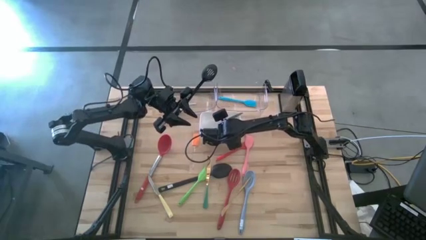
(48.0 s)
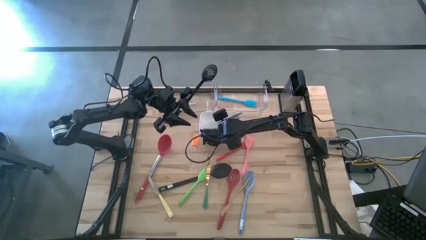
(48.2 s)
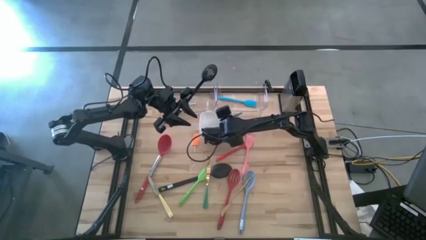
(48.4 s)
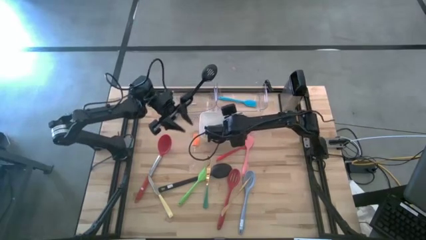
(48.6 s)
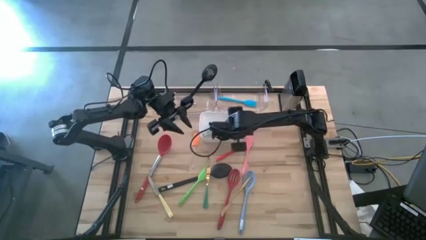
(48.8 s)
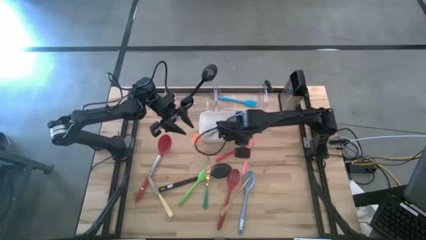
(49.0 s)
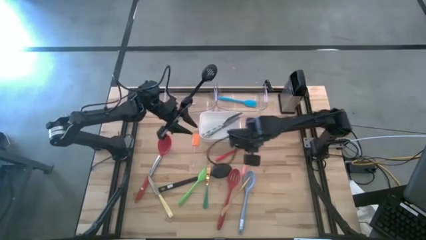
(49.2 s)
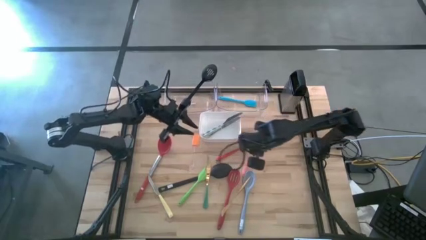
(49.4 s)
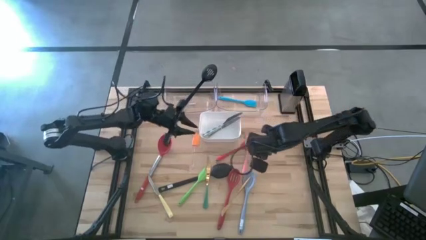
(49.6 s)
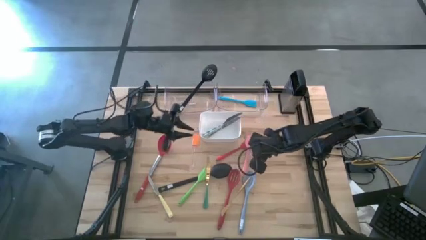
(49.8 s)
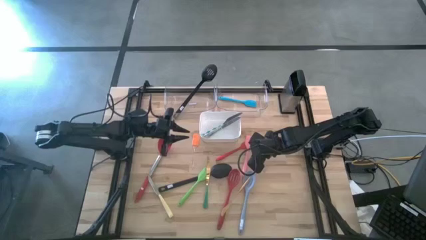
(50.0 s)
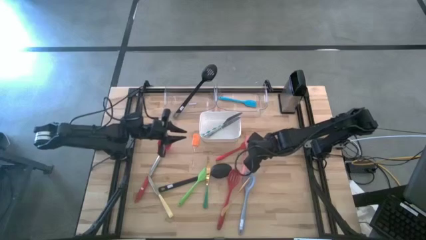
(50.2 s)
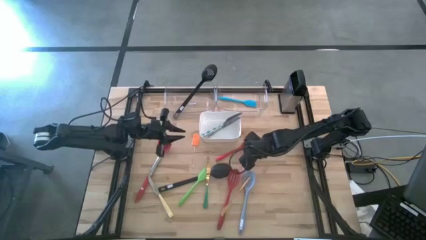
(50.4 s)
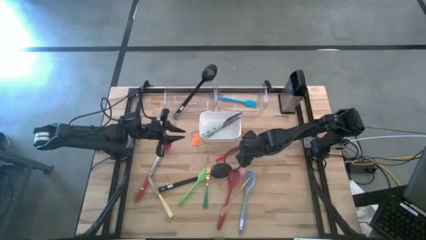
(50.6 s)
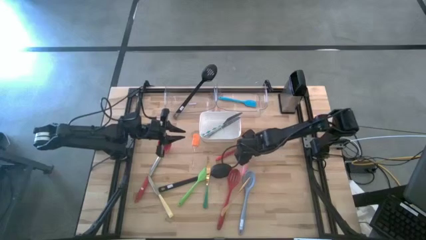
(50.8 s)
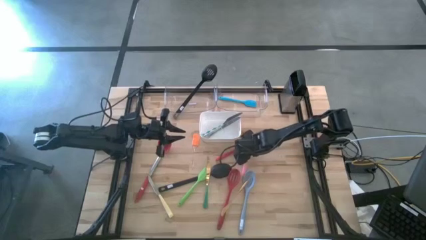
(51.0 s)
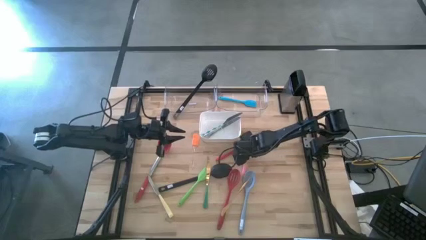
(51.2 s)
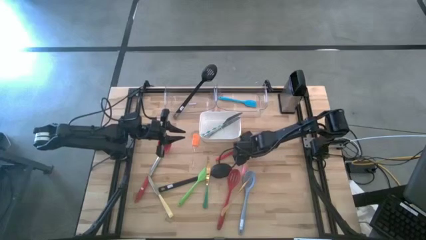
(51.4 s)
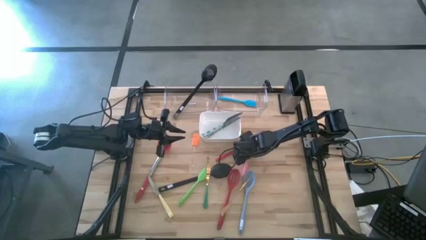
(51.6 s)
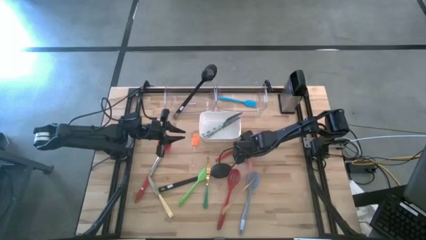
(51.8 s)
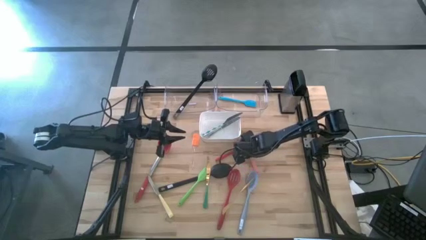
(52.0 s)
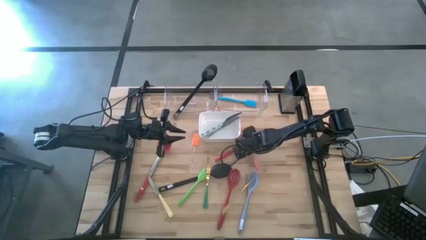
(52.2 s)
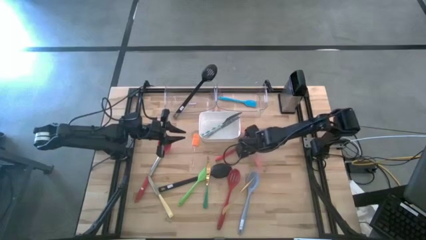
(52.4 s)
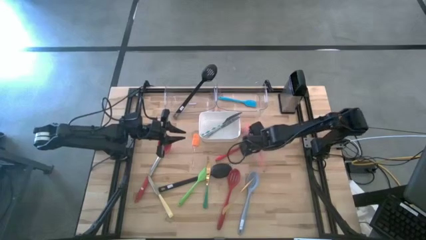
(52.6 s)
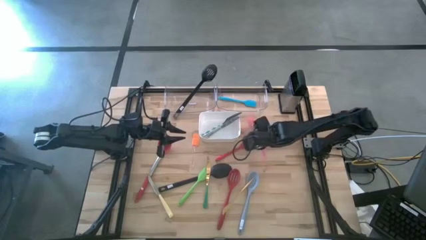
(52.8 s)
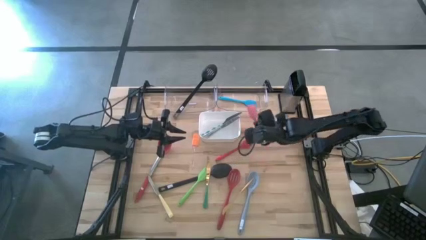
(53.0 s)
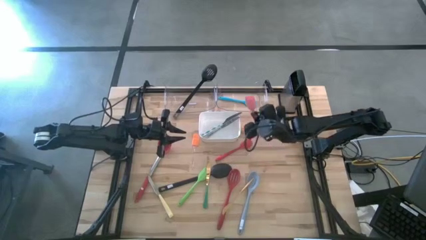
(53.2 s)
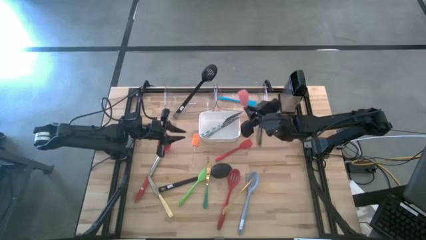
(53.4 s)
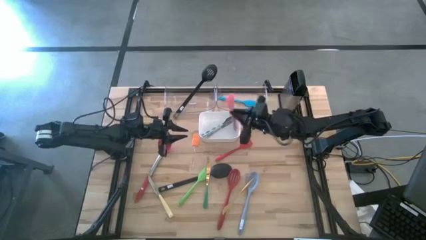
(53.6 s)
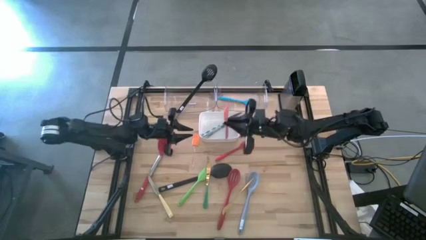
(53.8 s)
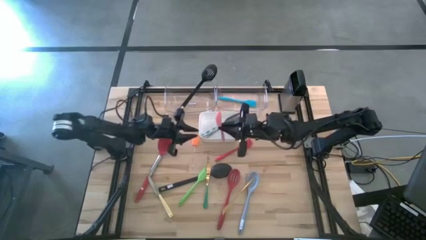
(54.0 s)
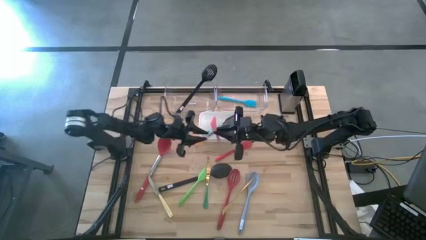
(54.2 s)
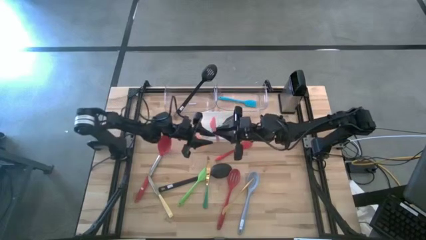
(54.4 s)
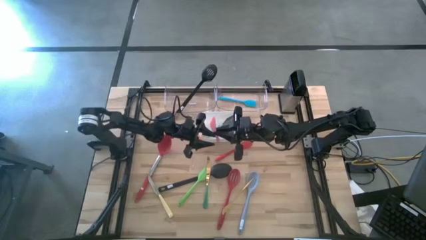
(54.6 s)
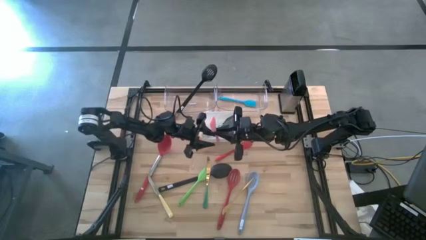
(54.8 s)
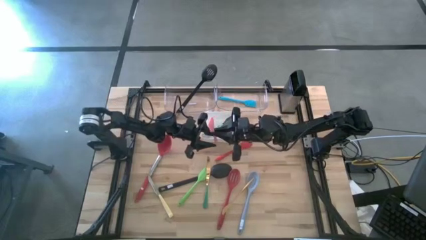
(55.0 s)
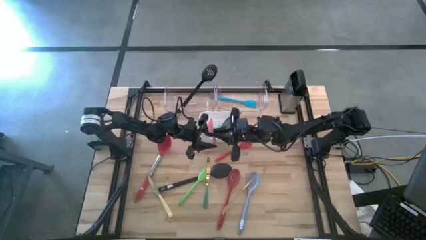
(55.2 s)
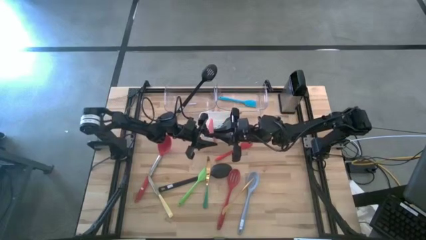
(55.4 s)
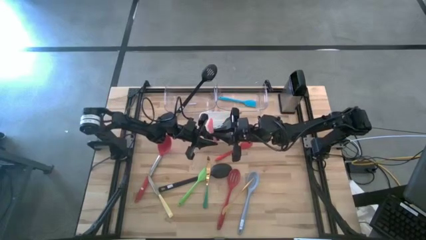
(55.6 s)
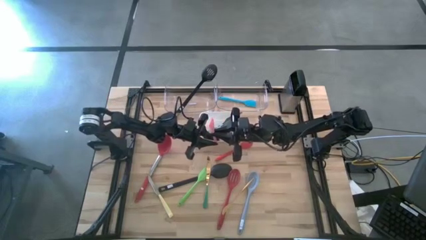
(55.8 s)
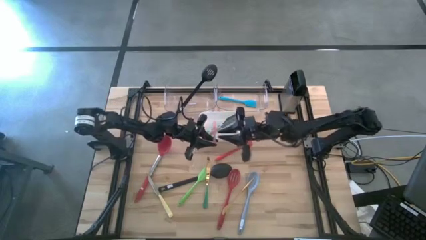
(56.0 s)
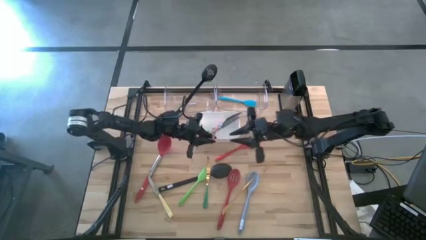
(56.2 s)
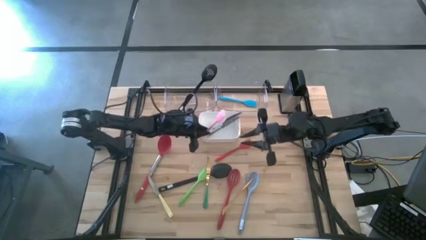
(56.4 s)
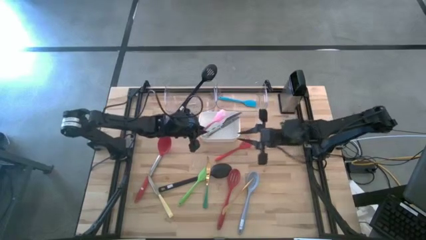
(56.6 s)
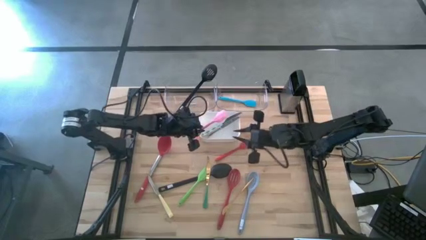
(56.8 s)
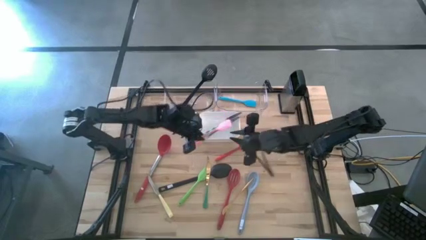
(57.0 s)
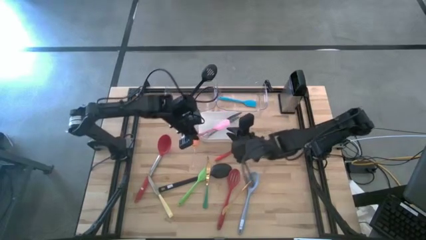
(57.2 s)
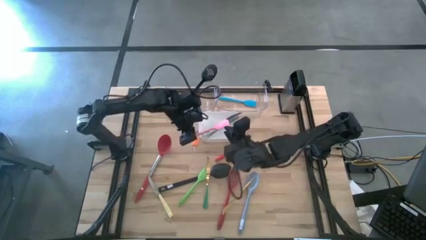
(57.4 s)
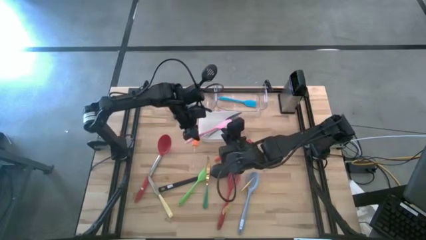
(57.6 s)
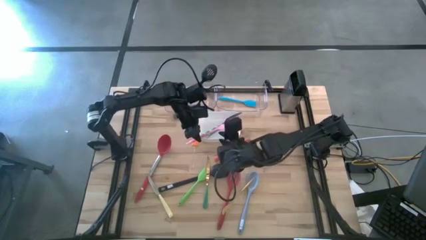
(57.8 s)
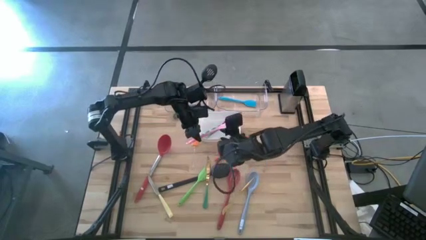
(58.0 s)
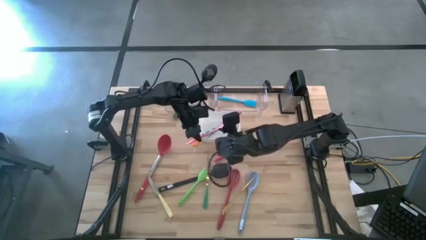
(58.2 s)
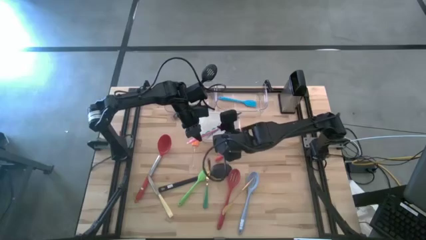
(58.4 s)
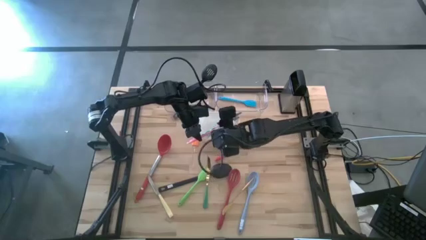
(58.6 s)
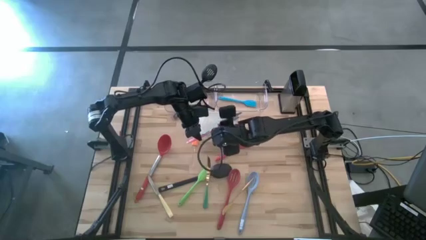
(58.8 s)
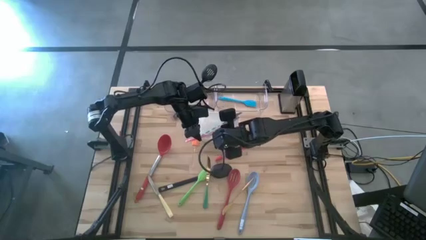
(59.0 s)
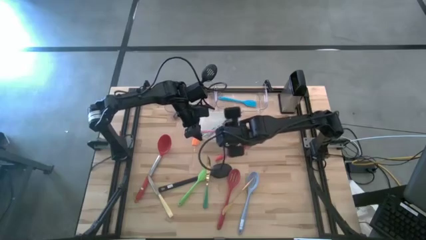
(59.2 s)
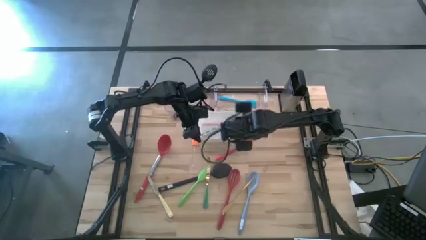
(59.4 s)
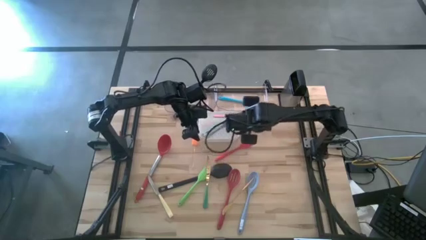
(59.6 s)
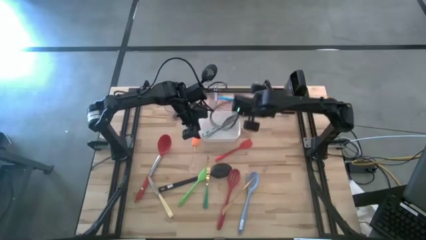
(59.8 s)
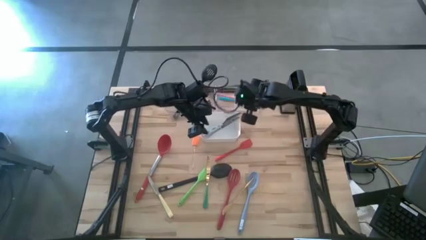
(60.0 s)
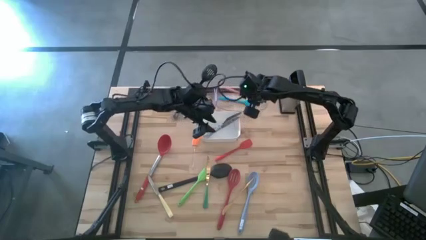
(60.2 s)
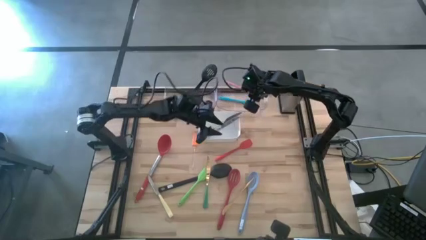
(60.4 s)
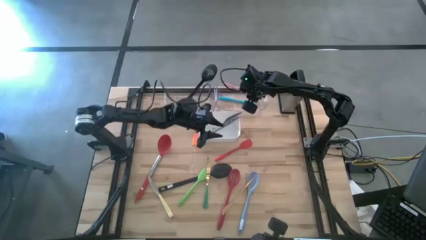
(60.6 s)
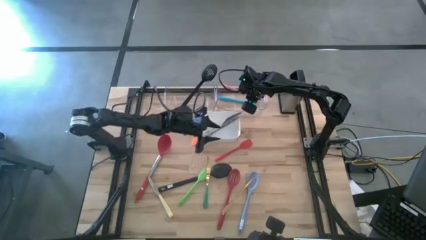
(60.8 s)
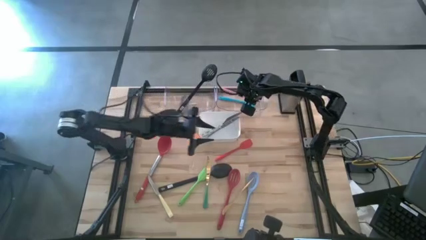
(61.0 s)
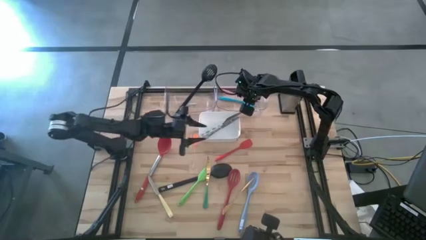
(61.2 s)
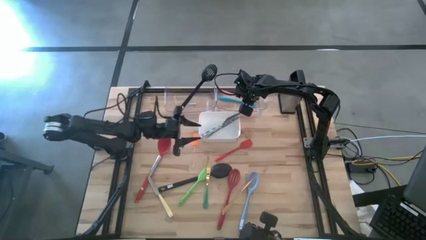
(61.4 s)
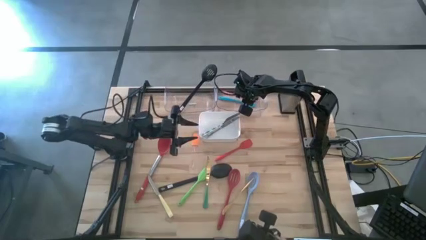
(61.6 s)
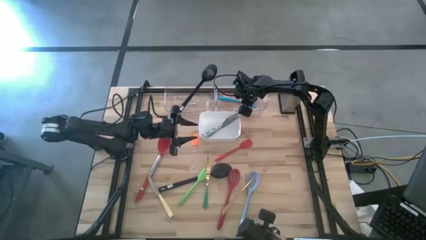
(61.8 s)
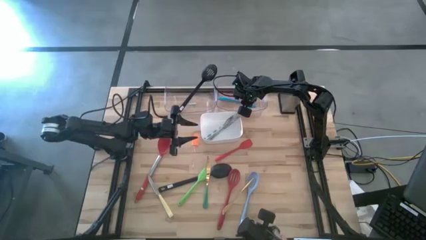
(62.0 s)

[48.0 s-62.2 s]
Task: Pick & Place Kitchen Items
Put the pink spatula into the right transparent bin

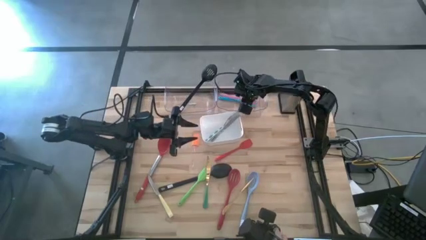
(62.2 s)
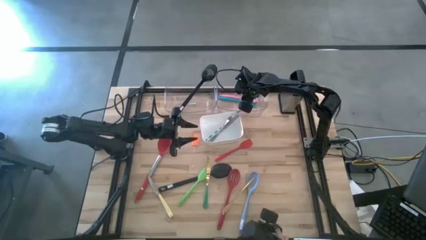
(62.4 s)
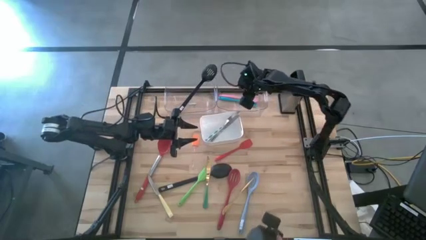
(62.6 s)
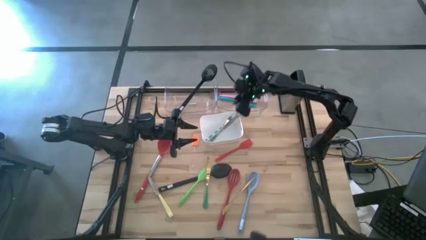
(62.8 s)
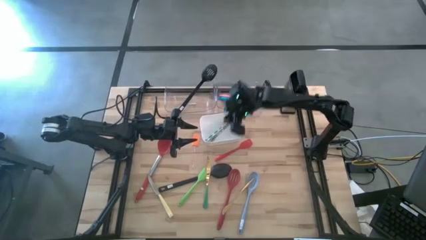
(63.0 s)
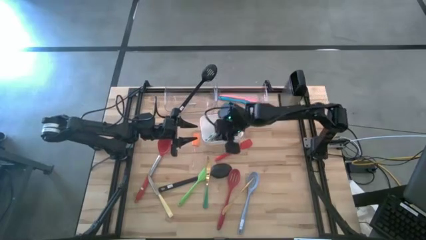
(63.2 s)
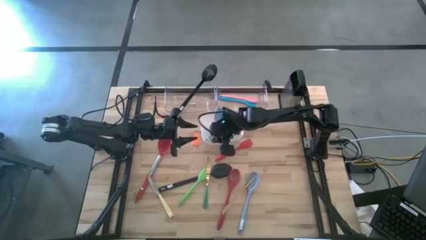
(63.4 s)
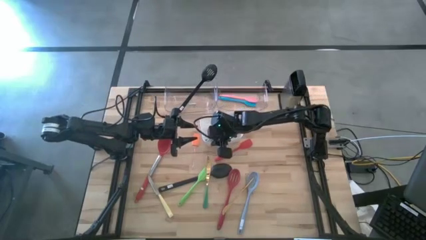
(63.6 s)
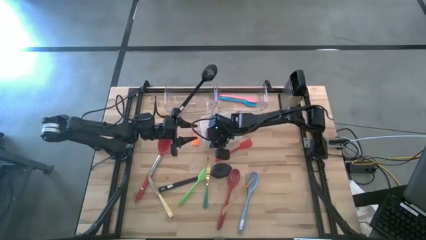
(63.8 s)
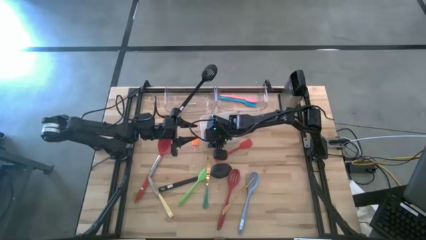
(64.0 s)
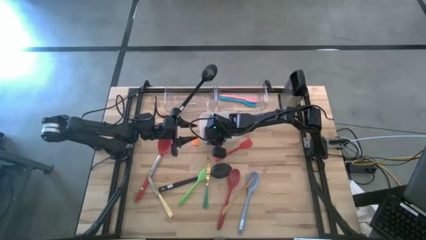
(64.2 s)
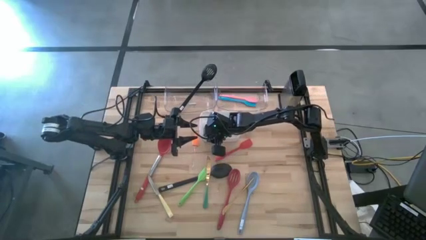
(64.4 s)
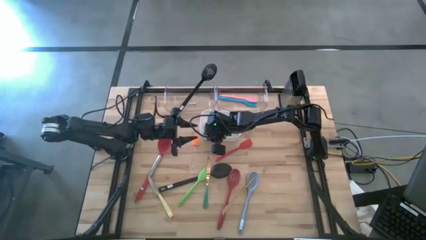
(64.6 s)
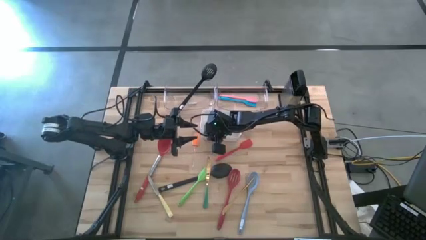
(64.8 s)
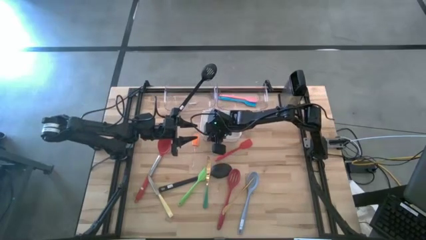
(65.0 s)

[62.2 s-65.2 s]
Adjust the white bin
